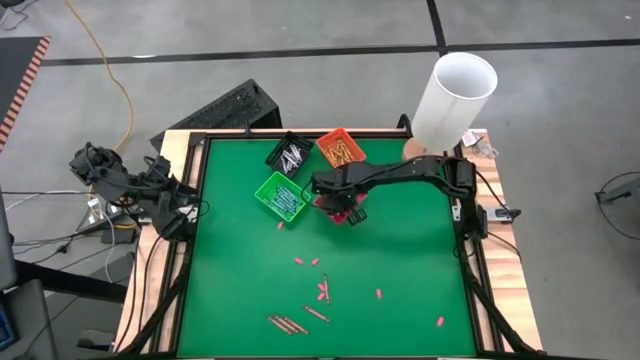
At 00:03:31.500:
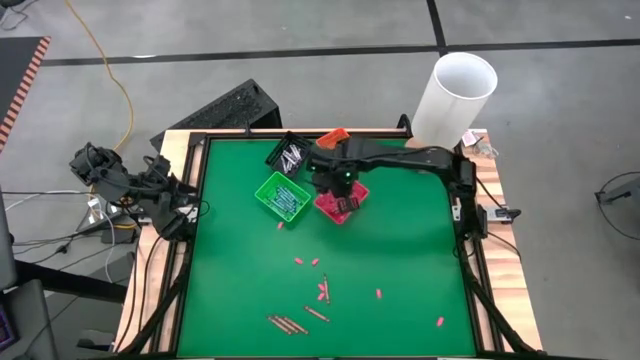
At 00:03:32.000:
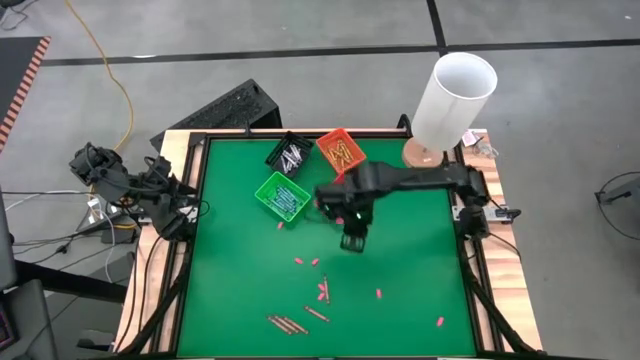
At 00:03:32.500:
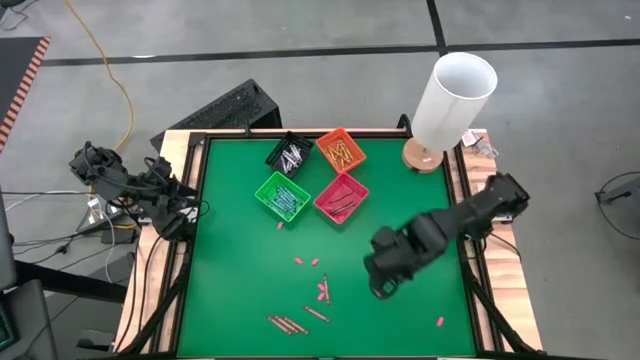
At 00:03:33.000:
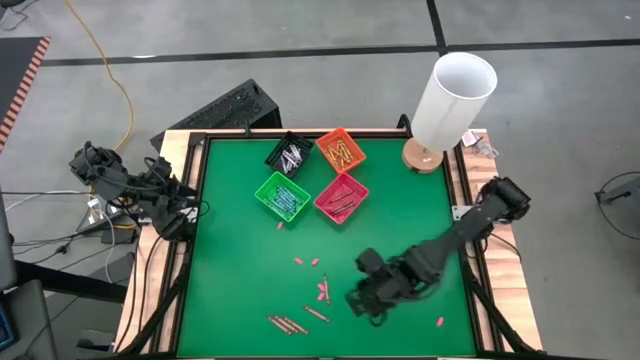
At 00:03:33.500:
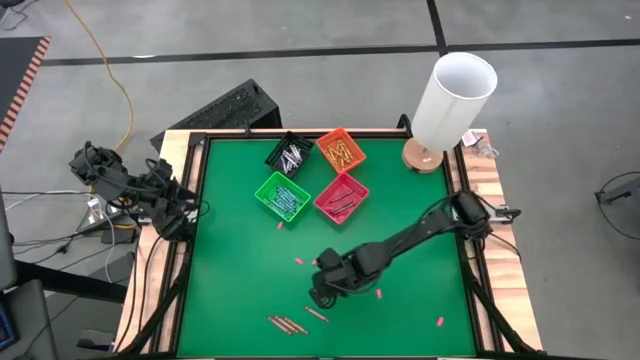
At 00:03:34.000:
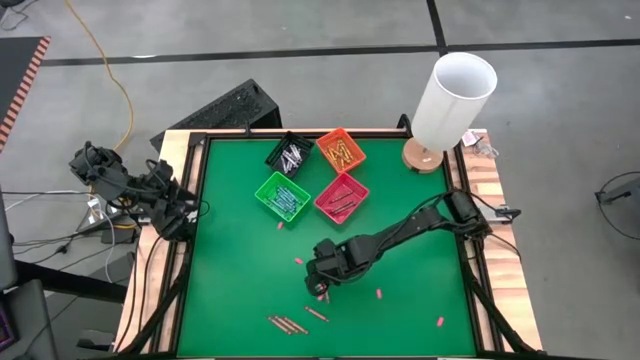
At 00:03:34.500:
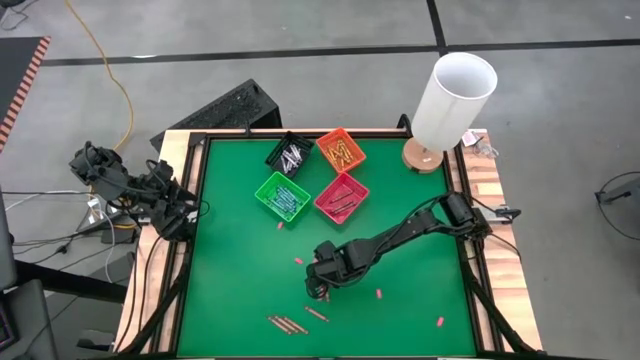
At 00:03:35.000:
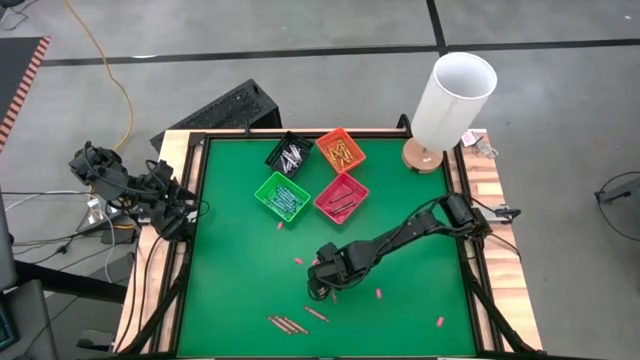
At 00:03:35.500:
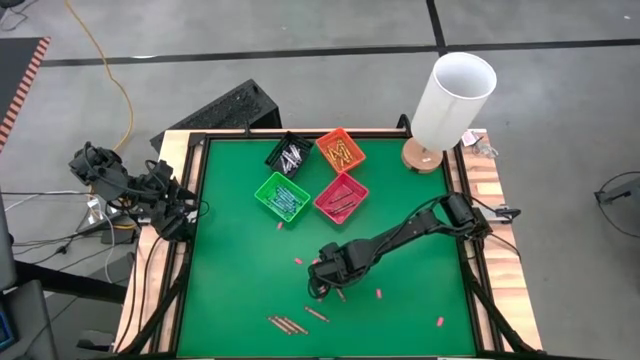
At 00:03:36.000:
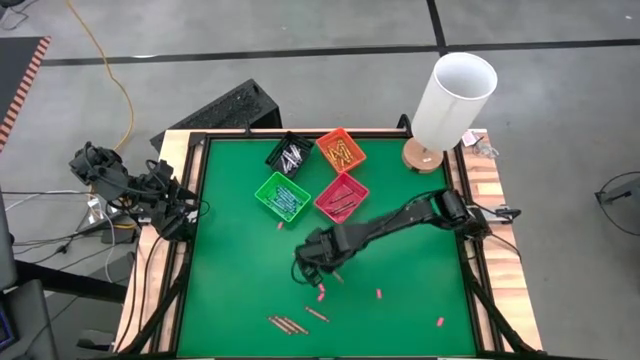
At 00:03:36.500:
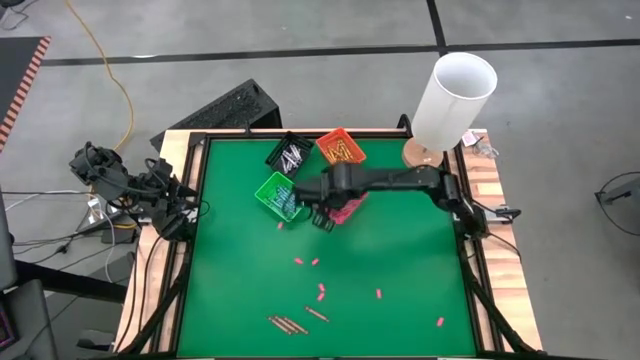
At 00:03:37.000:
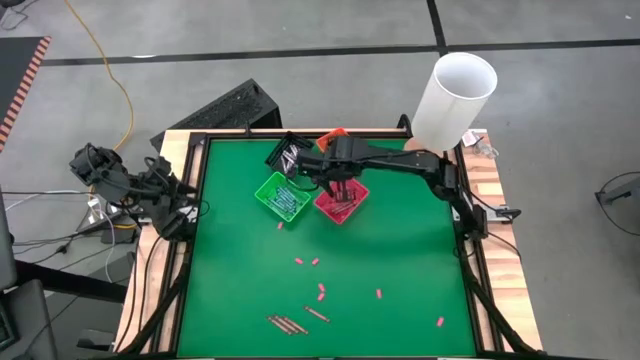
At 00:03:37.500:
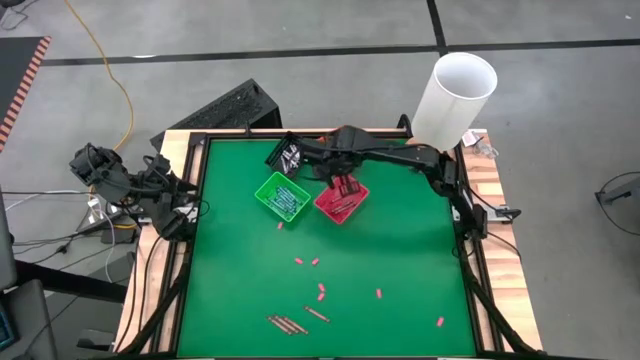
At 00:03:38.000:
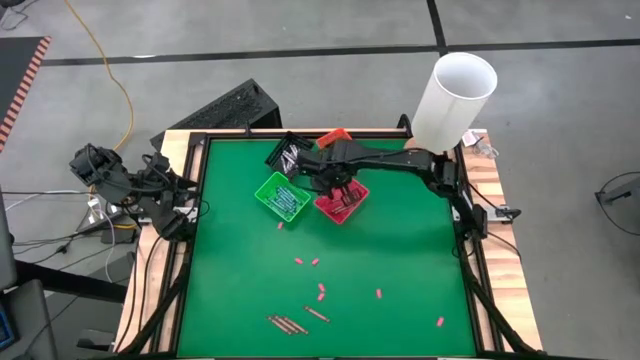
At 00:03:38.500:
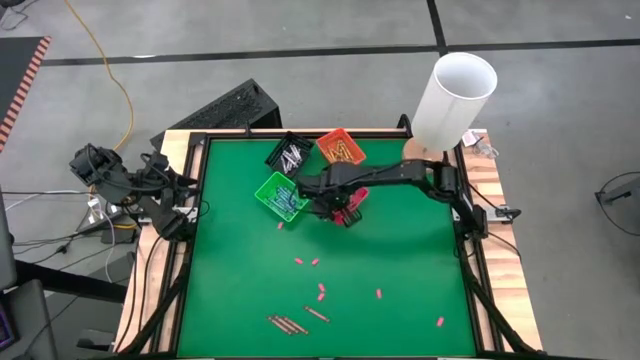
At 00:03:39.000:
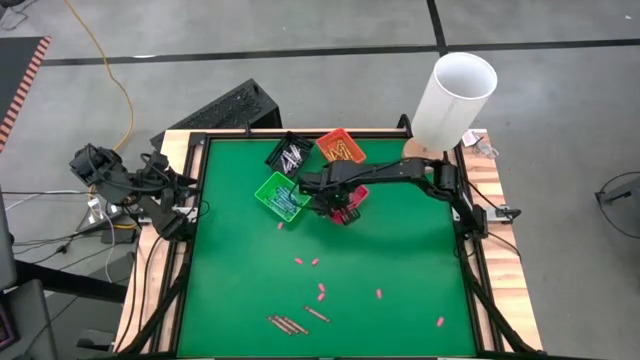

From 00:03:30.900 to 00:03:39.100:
Task: Sort crayons
Put the brown crayon into the bin

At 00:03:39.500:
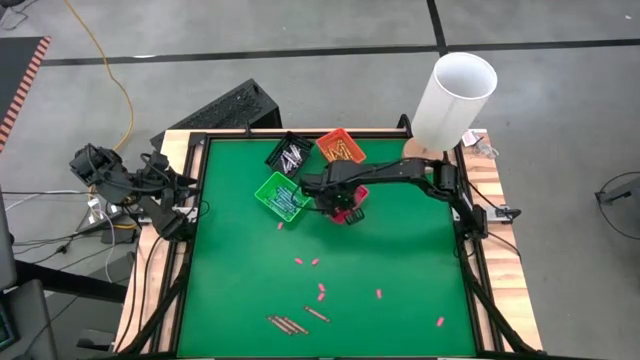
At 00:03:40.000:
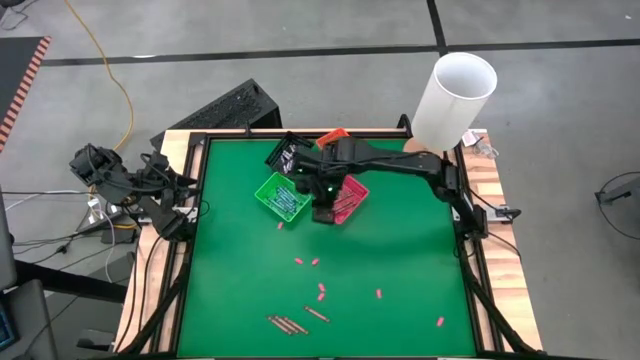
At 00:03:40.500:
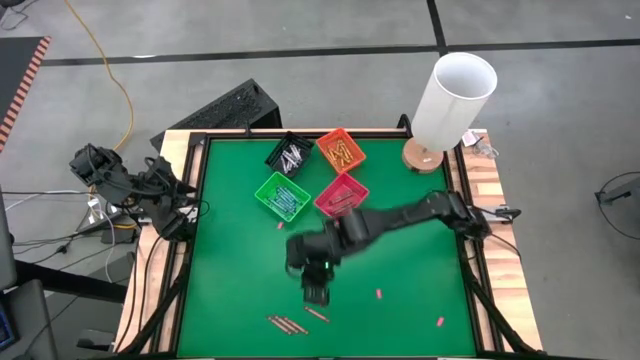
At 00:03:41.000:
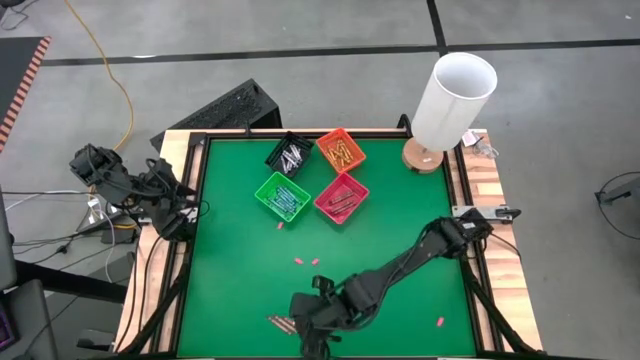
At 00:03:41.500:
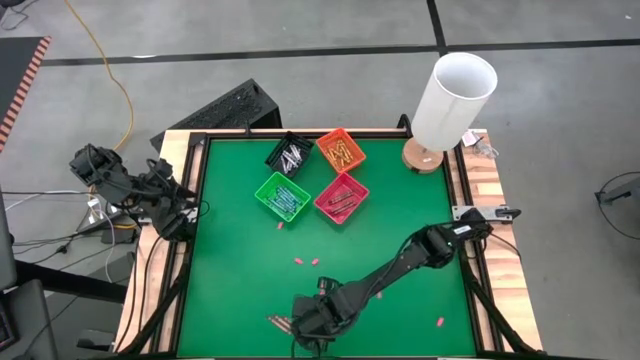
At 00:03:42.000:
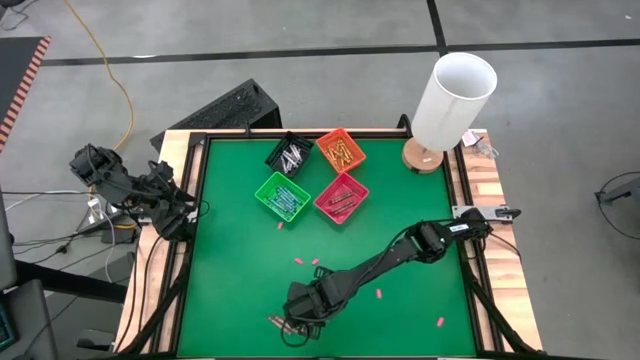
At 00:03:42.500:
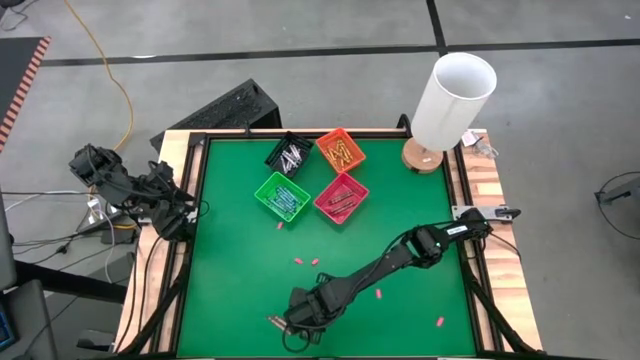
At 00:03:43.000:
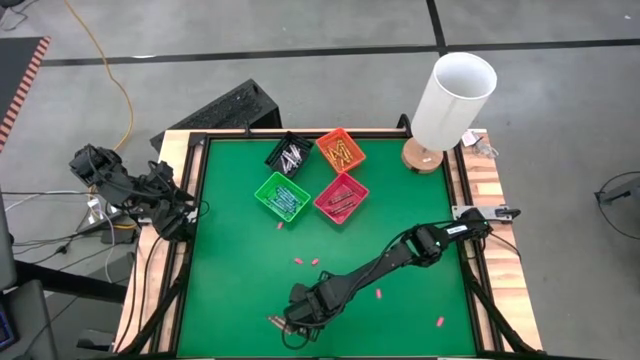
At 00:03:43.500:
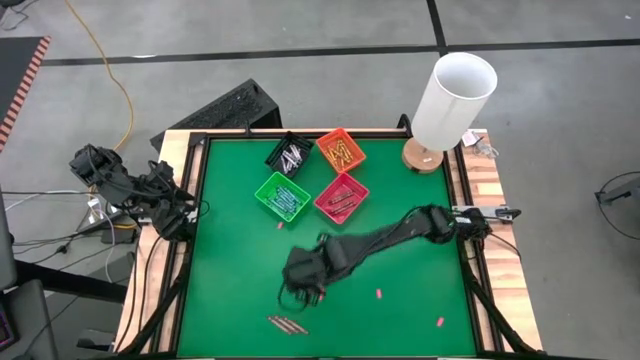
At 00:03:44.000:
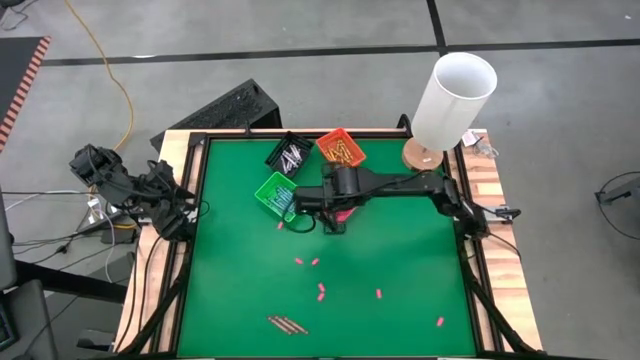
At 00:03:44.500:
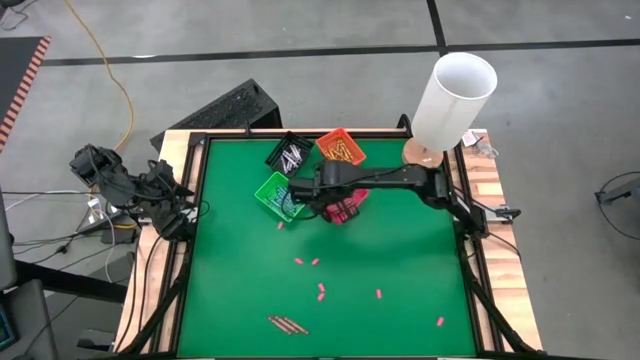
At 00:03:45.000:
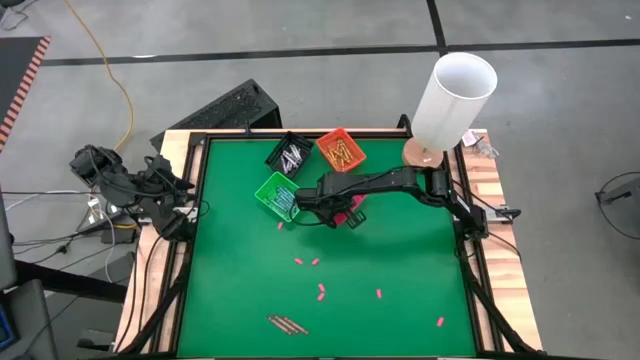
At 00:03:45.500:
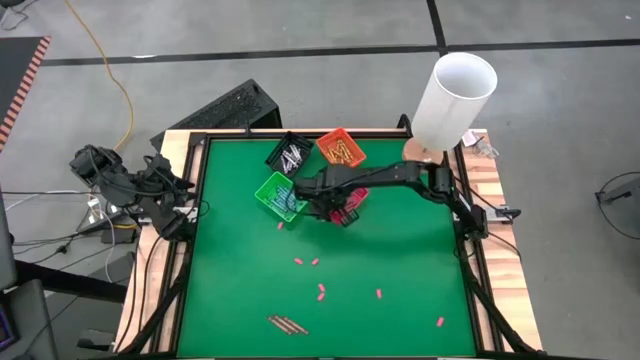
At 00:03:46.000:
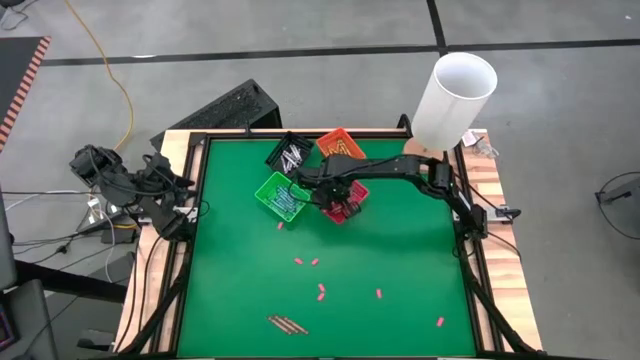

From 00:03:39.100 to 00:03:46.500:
Put the brown crayon into the bin

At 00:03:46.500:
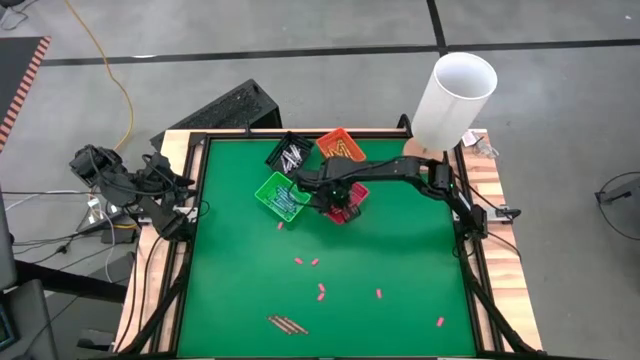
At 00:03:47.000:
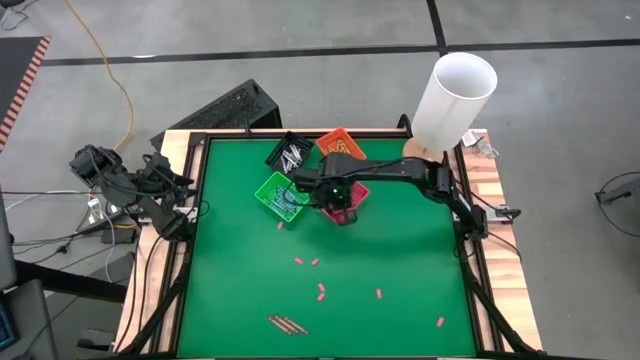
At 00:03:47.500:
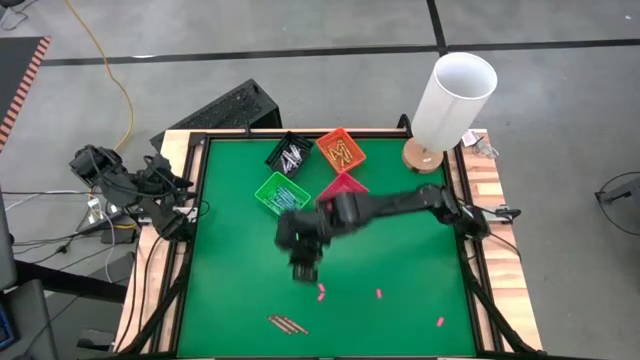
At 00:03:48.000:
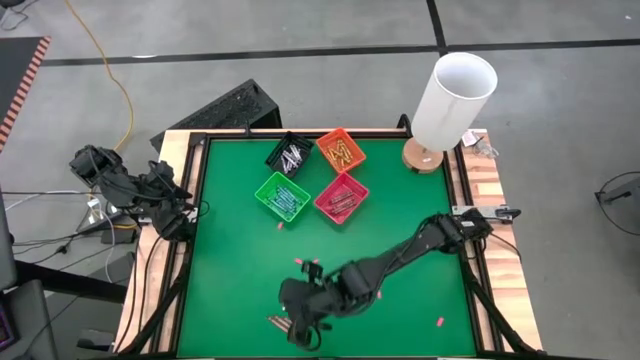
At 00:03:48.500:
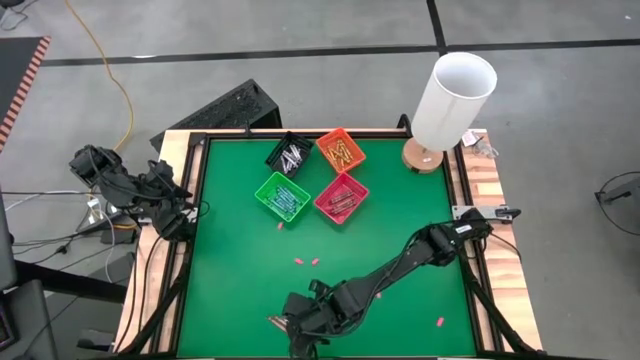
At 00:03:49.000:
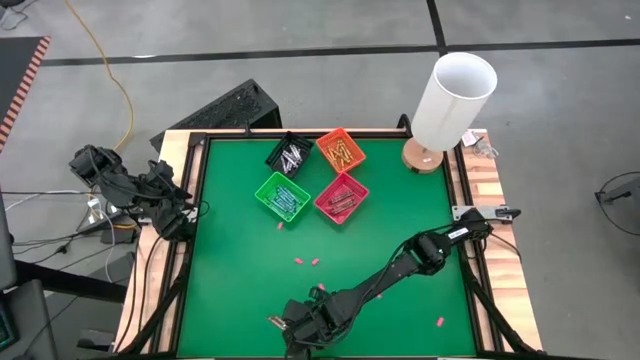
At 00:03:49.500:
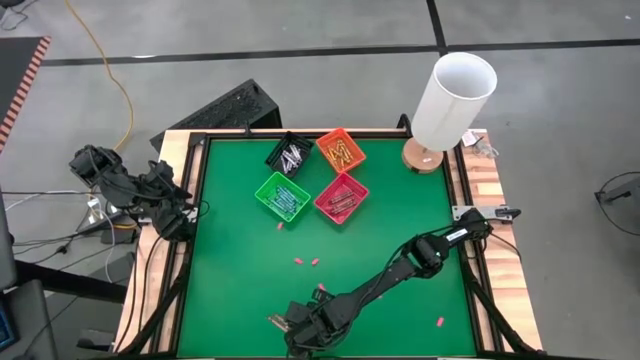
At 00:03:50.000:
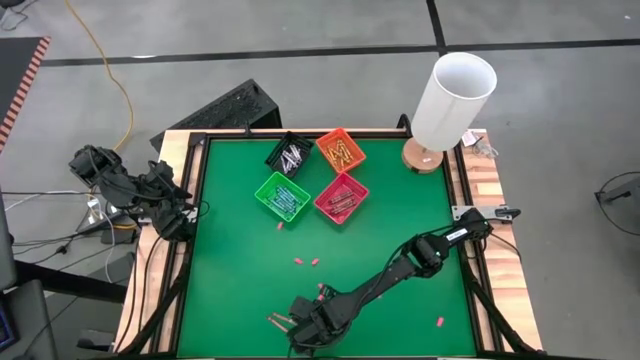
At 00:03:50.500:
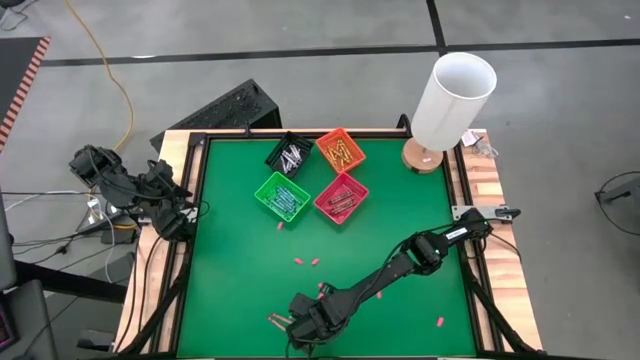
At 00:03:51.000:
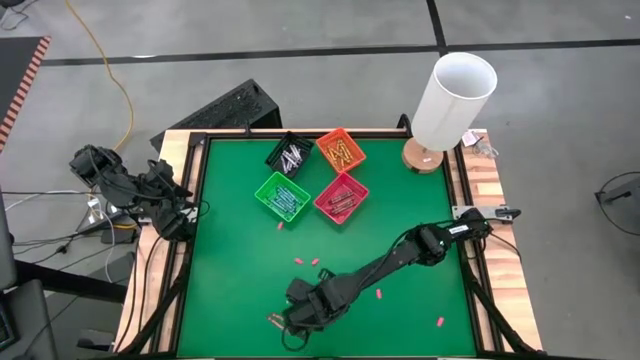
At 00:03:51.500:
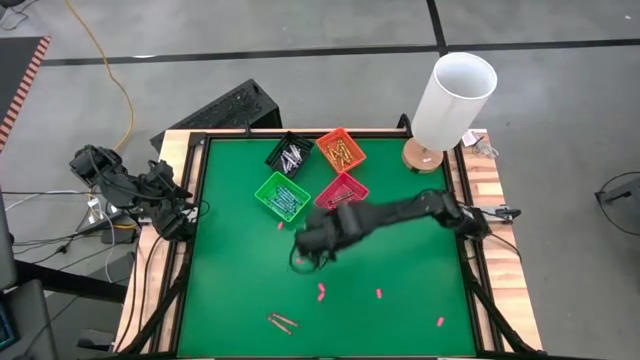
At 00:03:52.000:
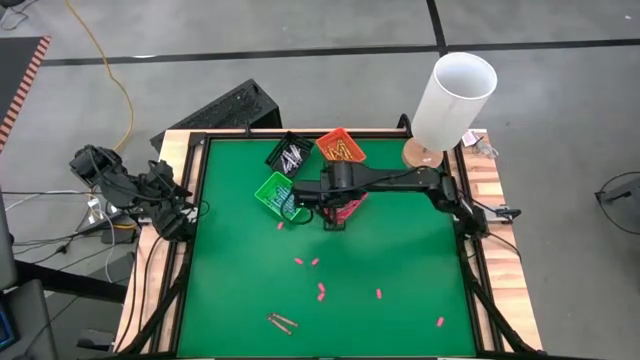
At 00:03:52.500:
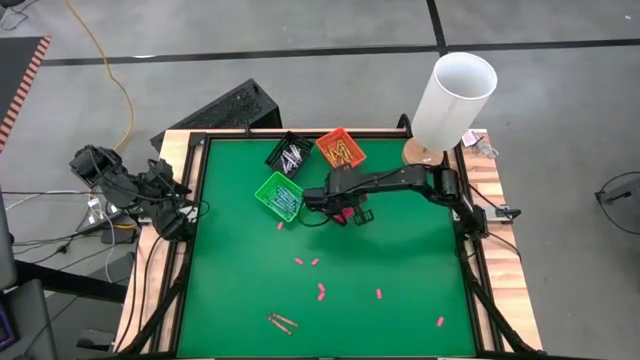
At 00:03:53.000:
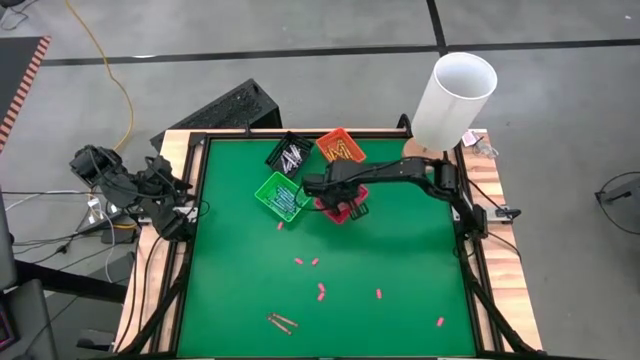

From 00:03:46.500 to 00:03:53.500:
Put the brown crayon into the bin
